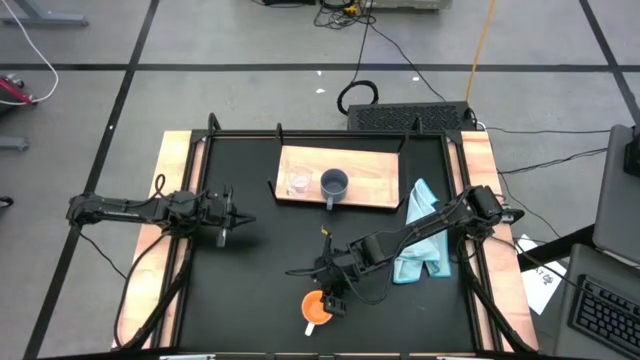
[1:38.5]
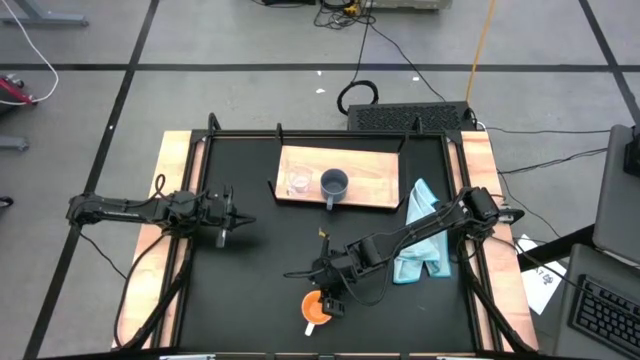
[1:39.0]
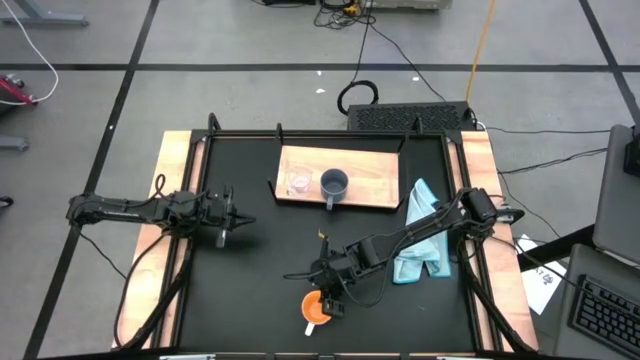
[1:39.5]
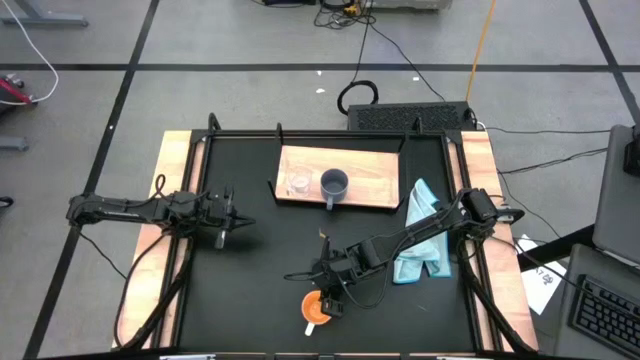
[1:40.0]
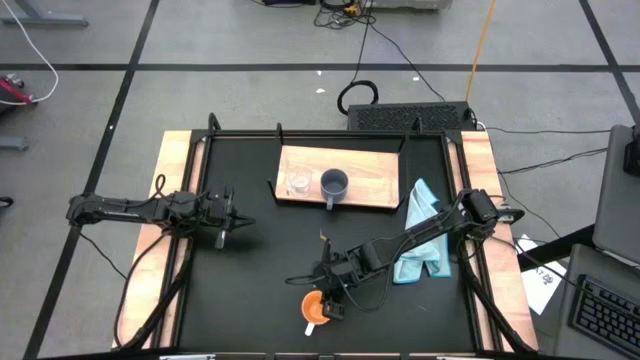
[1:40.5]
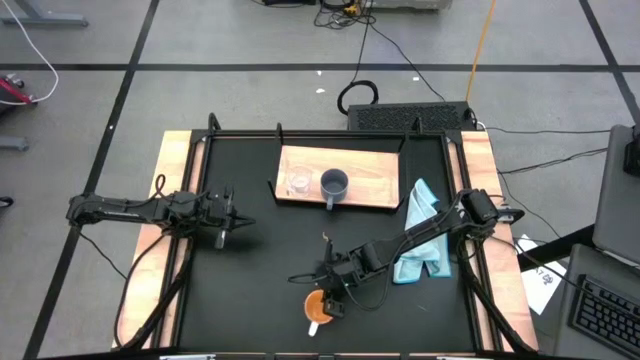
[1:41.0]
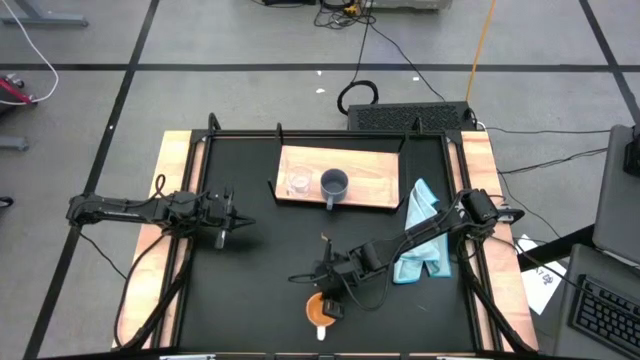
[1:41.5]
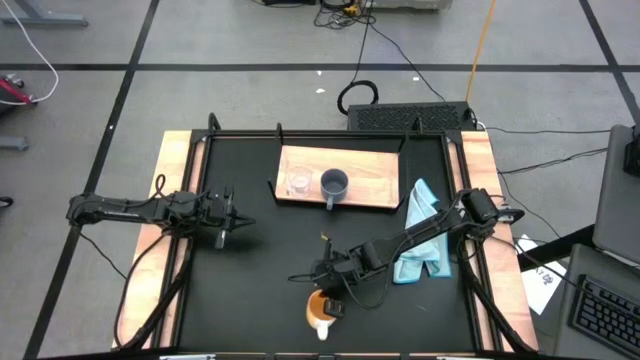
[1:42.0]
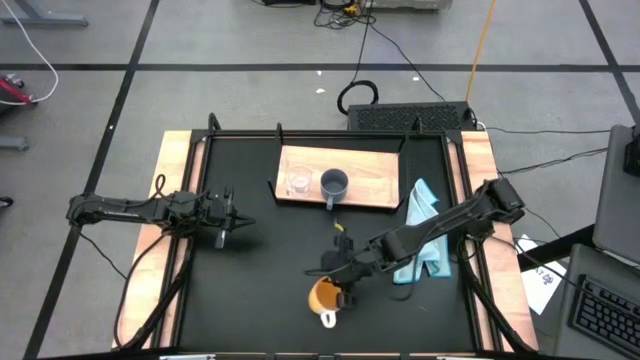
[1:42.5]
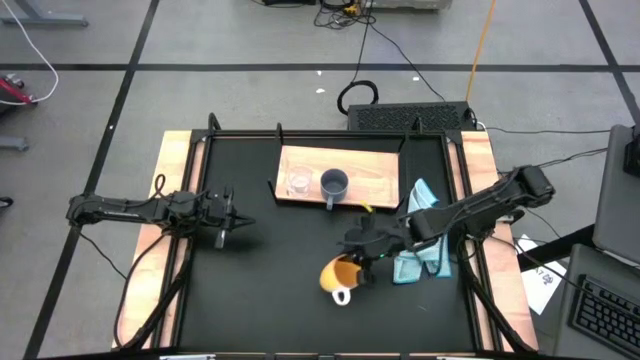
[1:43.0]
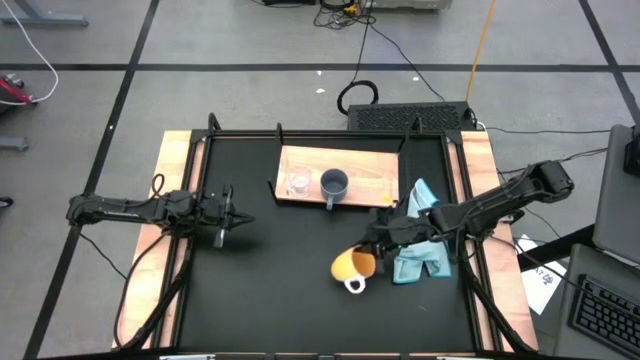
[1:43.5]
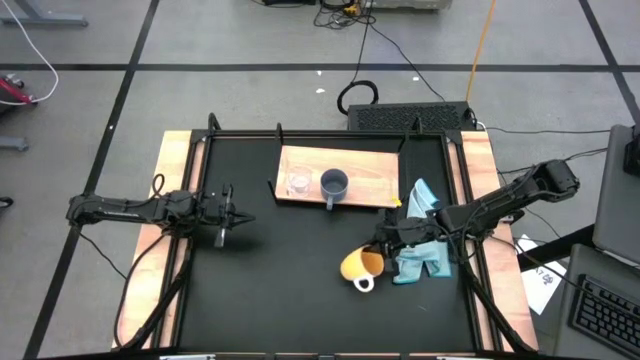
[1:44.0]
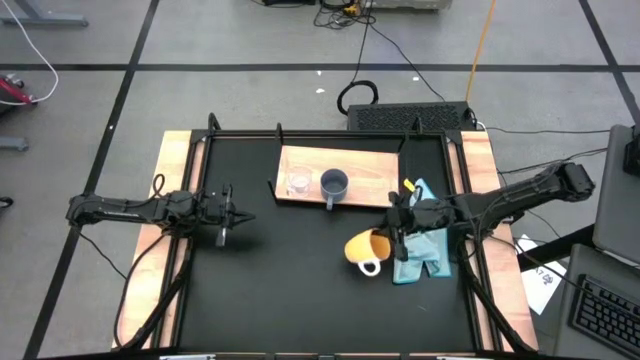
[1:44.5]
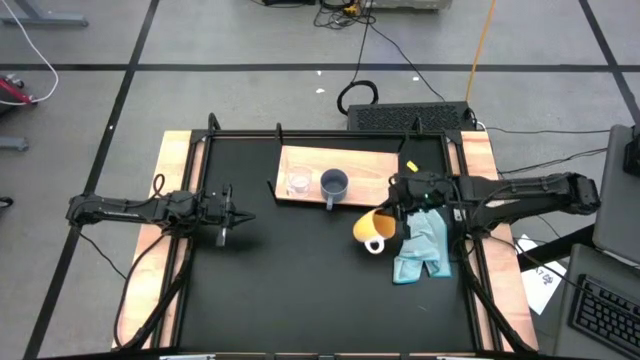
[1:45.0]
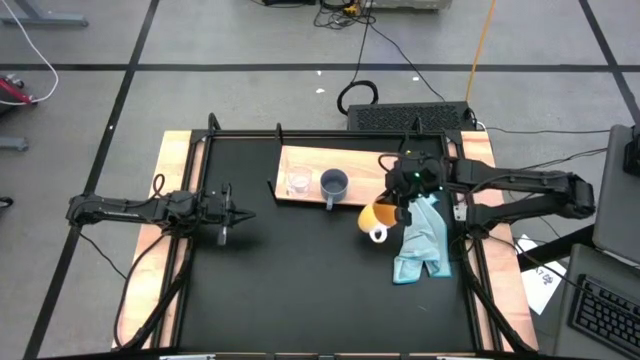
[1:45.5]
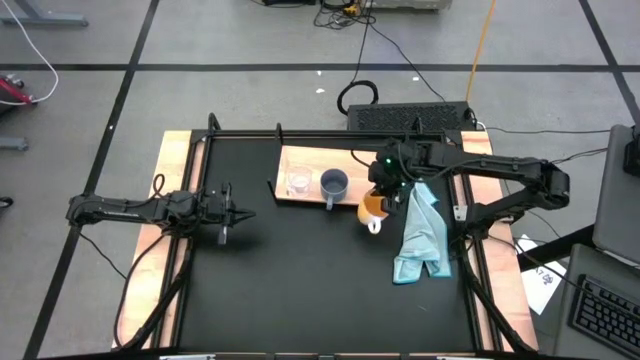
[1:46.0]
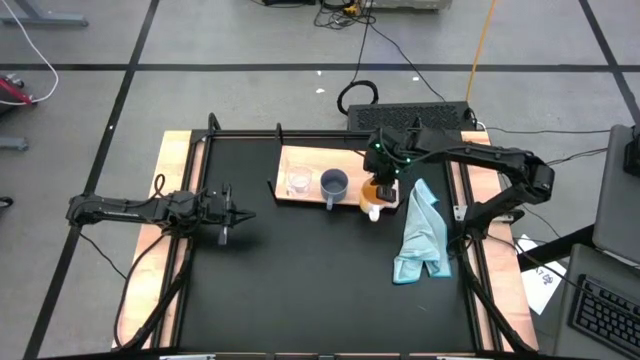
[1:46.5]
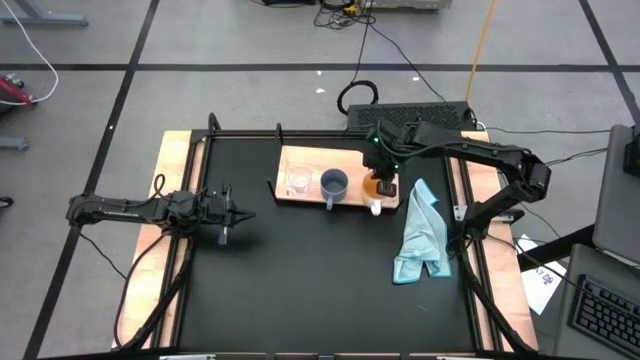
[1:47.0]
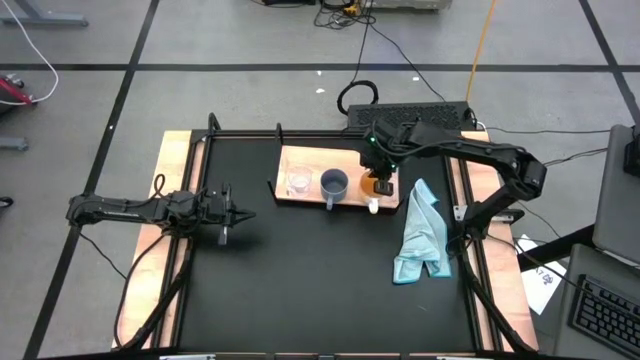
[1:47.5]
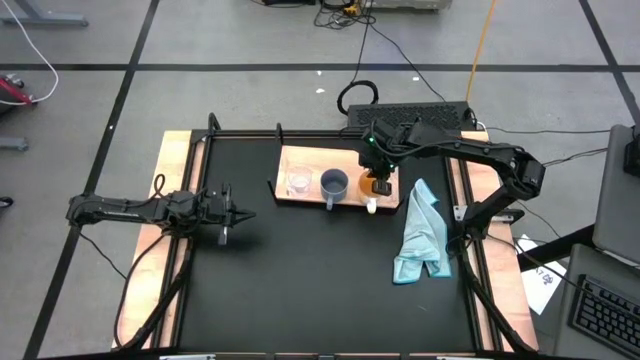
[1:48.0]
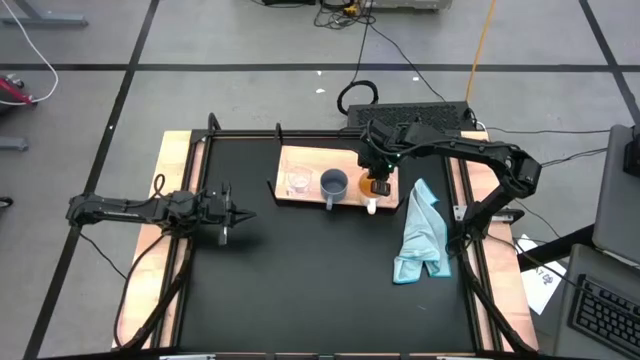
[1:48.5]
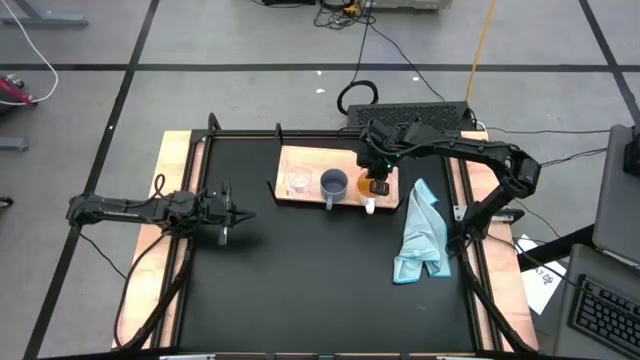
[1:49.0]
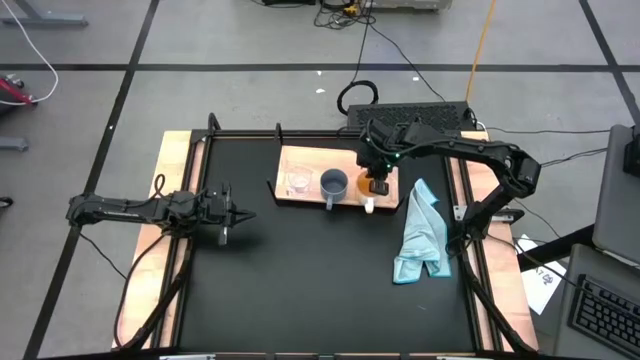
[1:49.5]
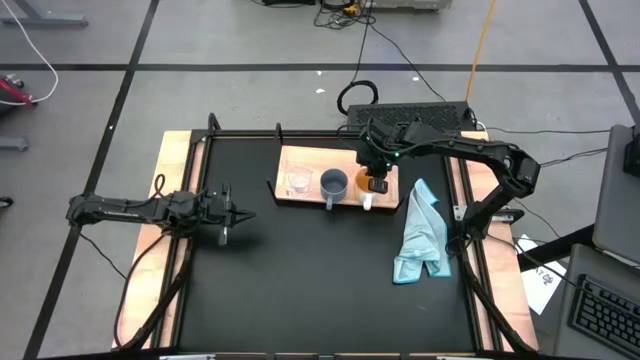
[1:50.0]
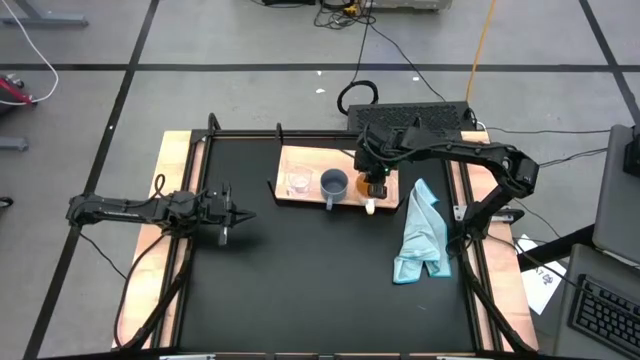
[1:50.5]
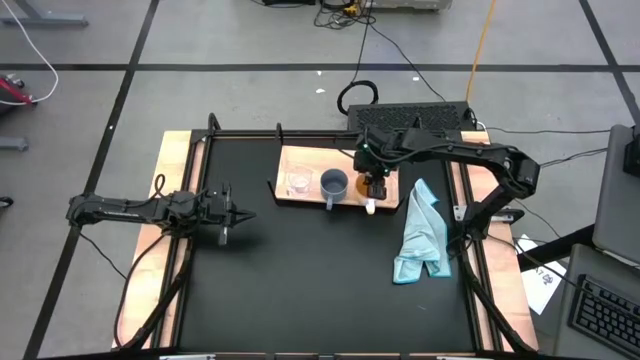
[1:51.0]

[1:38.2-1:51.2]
Task: Stack small to large cups/mugs on shelf
Put the yellow mug on the shelf

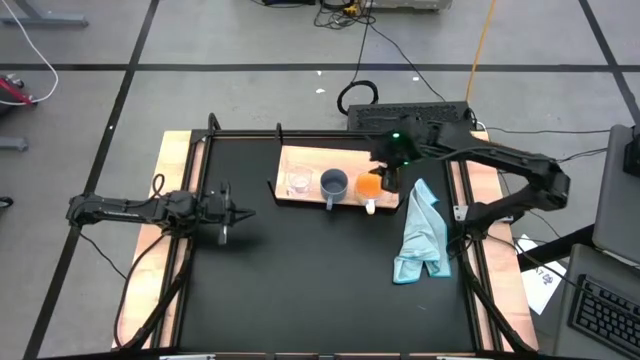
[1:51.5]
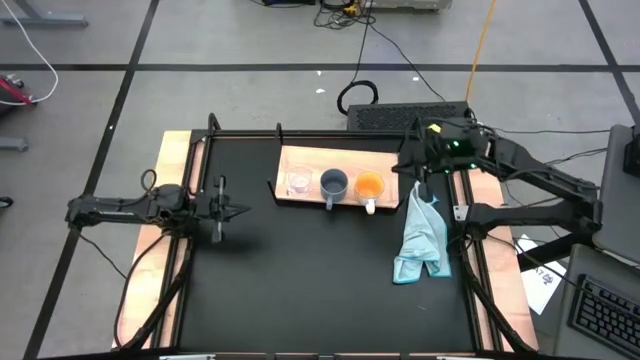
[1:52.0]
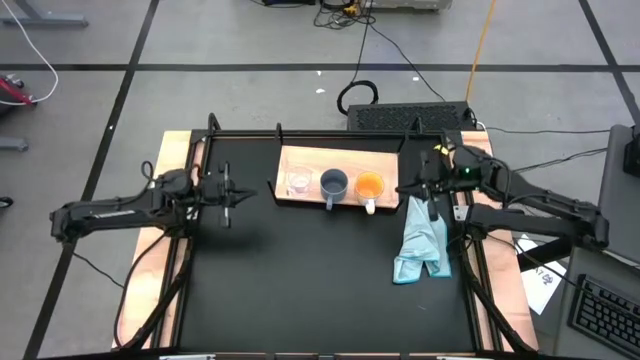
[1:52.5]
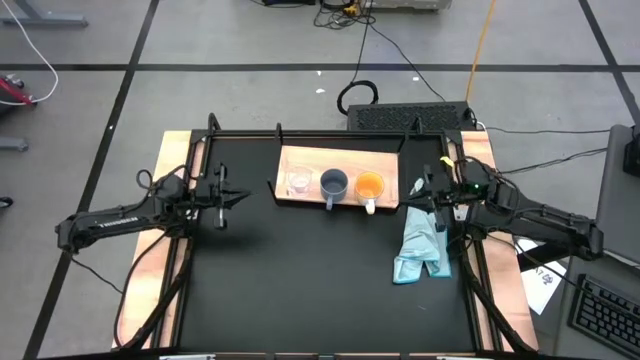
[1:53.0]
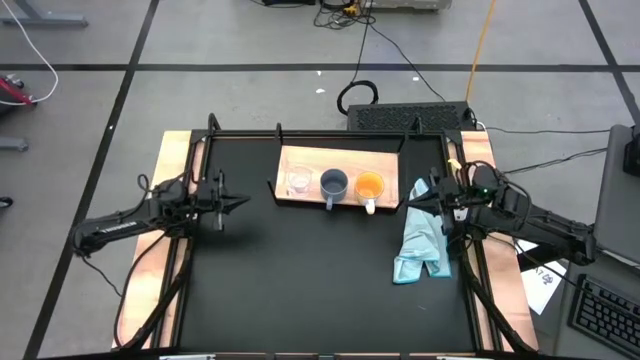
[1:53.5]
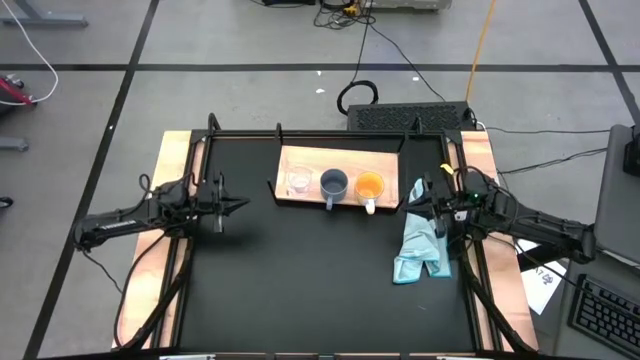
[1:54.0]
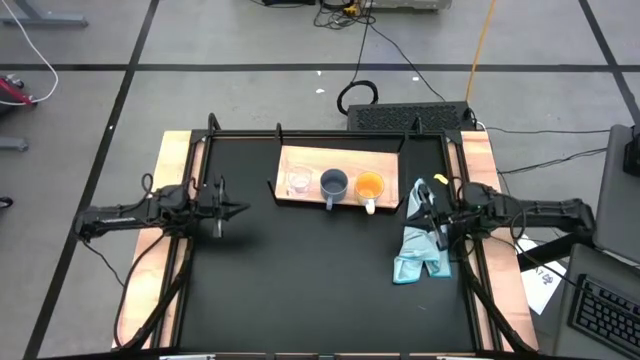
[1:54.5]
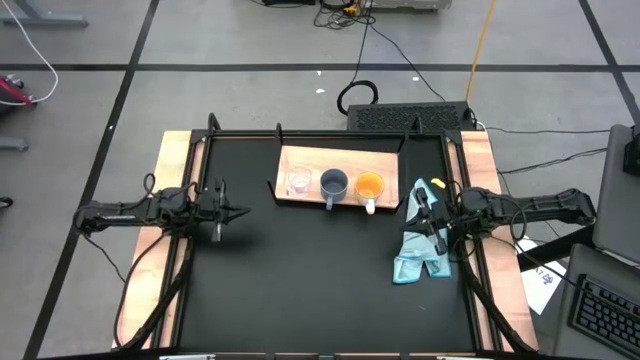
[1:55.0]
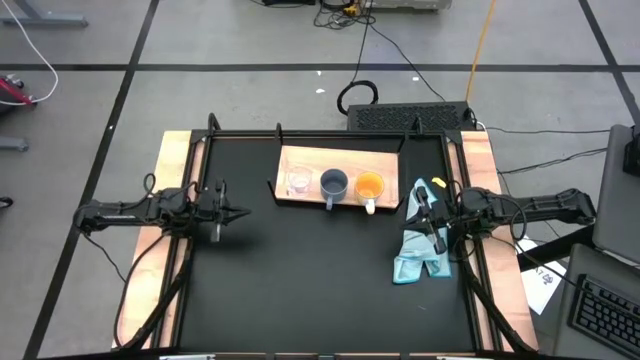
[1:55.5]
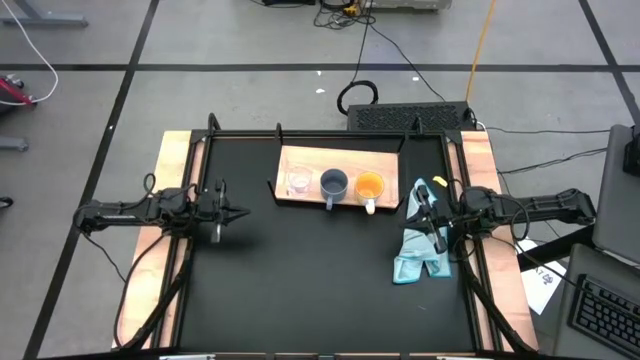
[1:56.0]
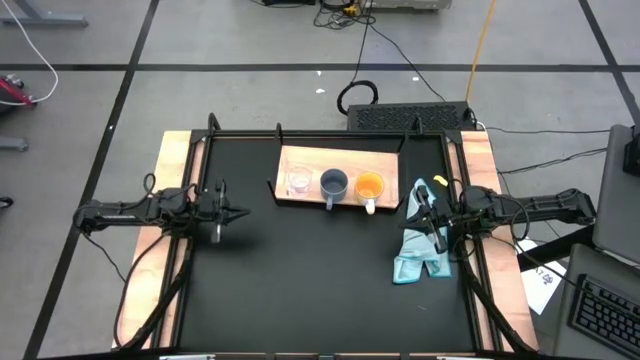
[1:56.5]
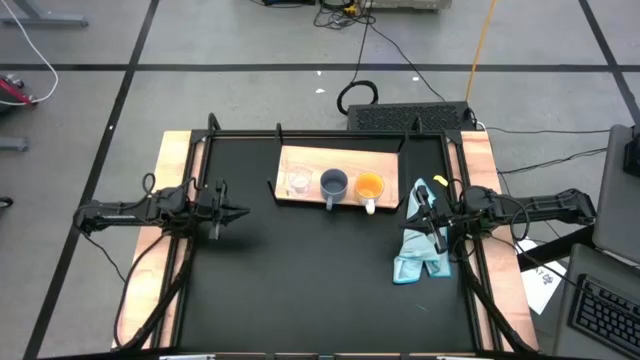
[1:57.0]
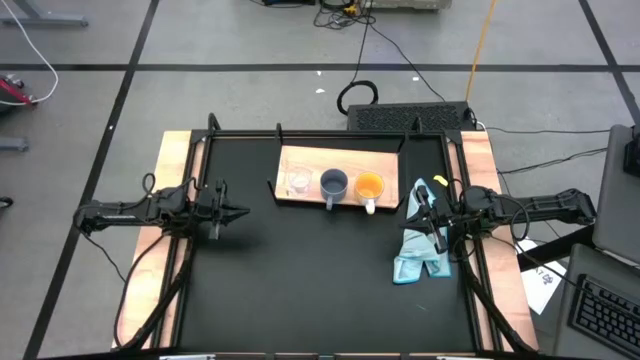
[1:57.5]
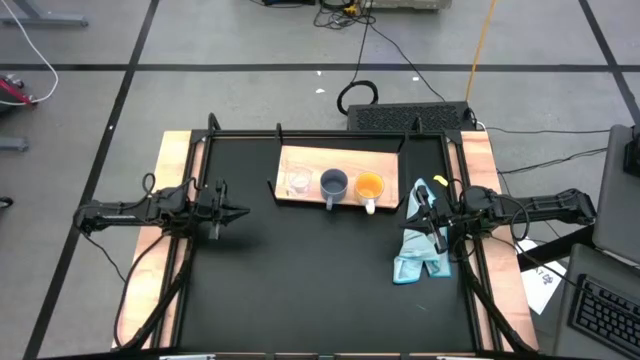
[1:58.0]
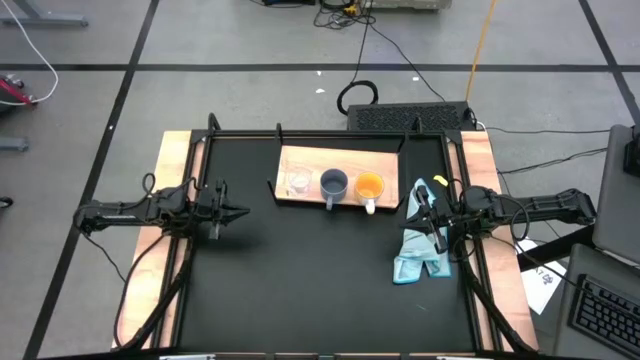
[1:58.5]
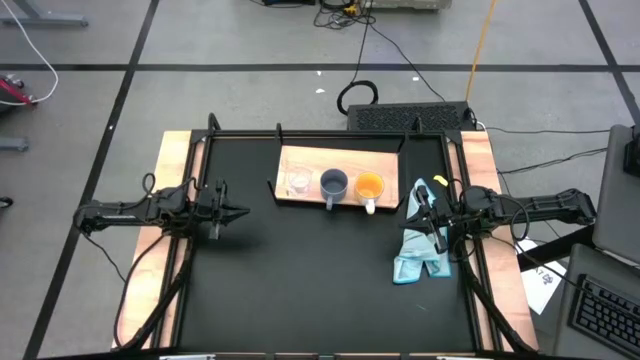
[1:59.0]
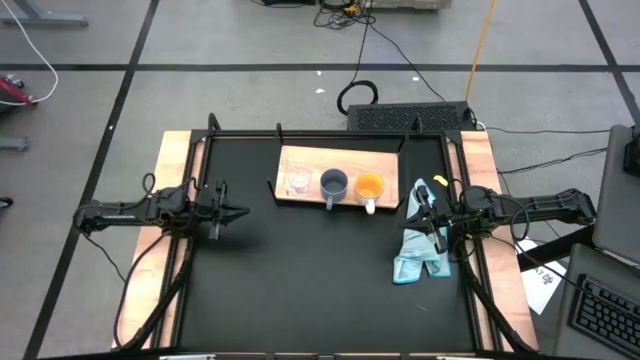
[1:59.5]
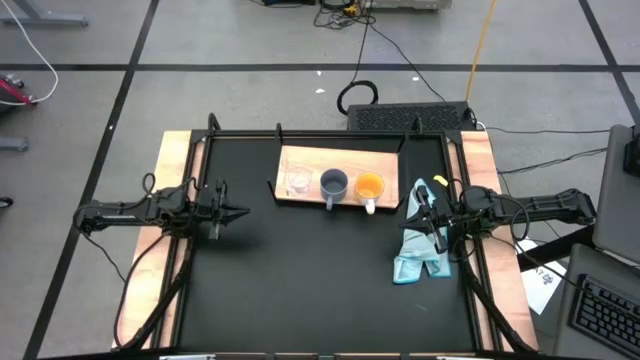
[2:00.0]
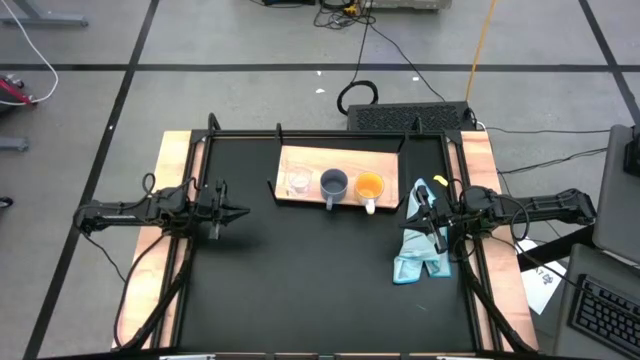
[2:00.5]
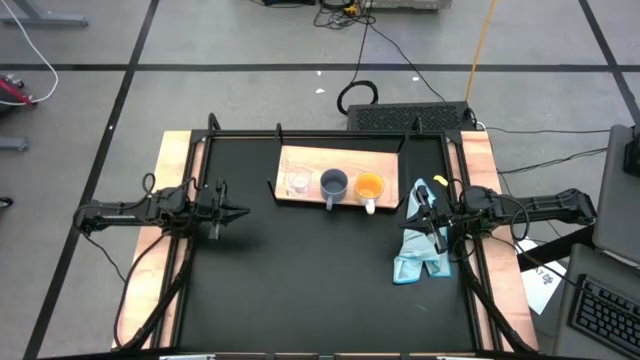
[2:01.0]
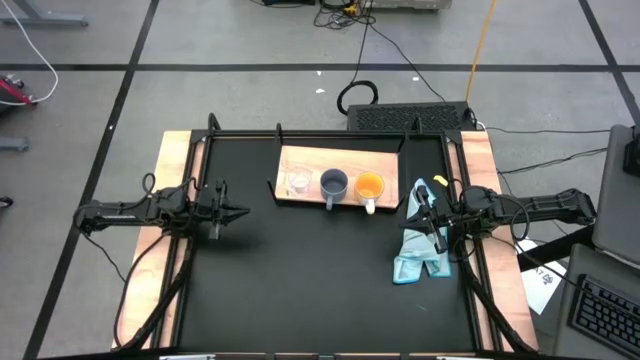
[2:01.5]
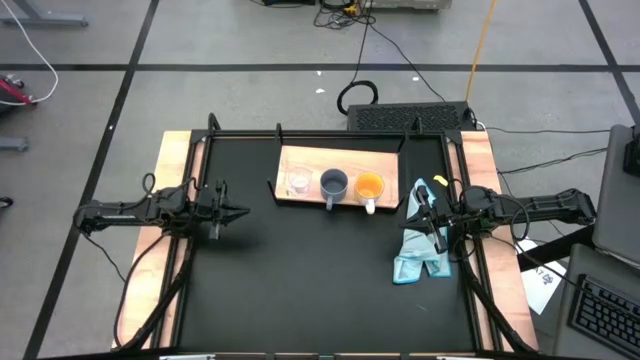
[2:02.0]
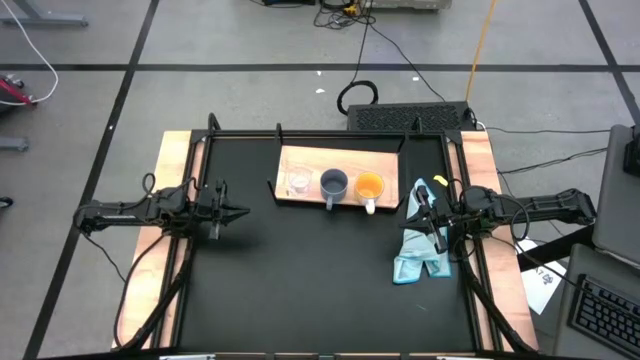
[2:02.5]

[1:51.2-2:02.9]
Return to Home Position
